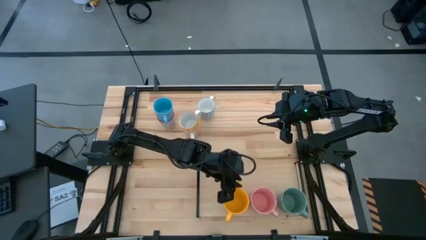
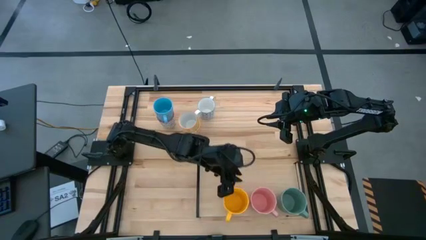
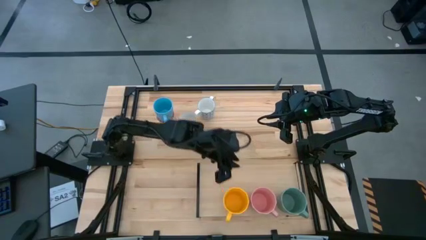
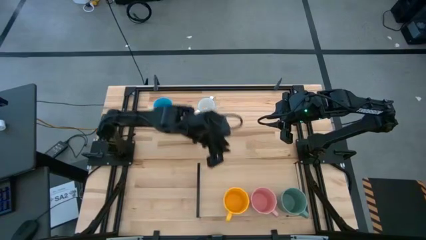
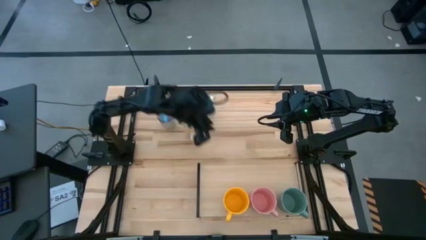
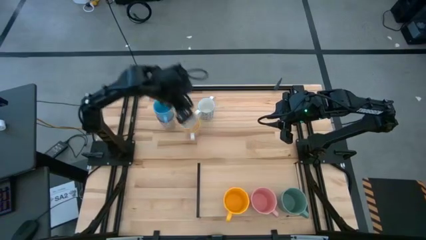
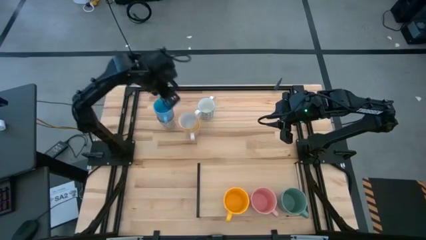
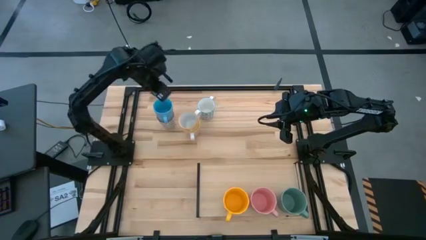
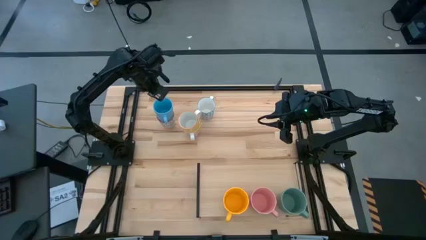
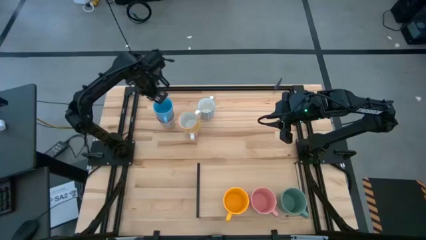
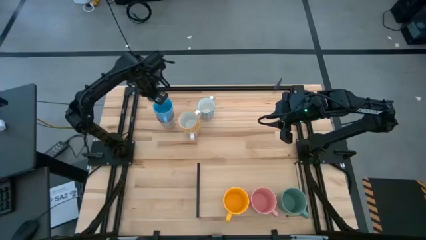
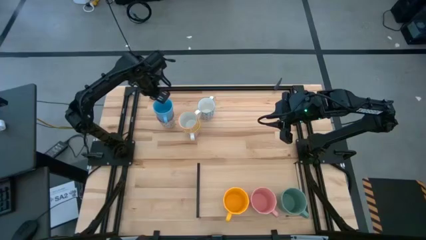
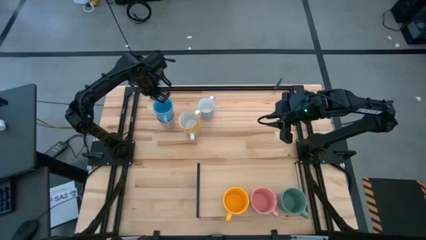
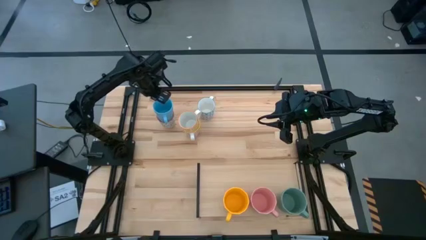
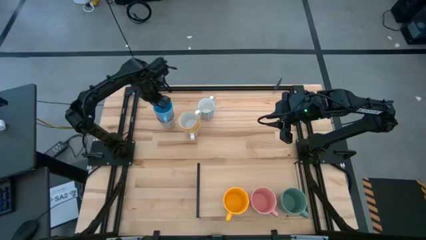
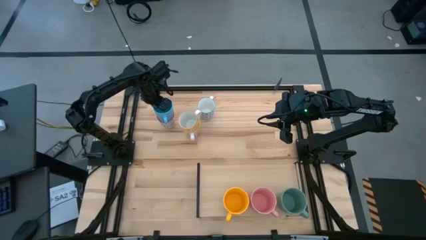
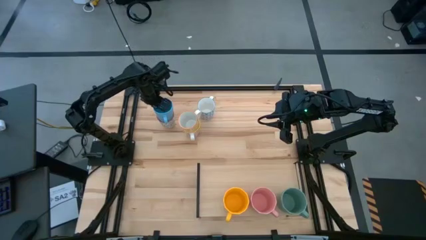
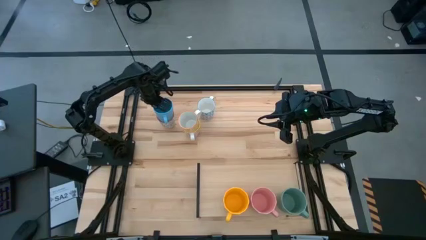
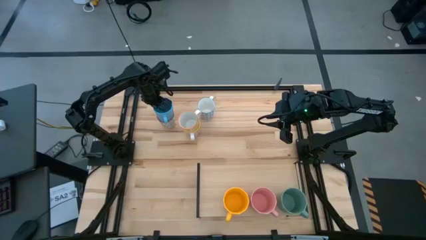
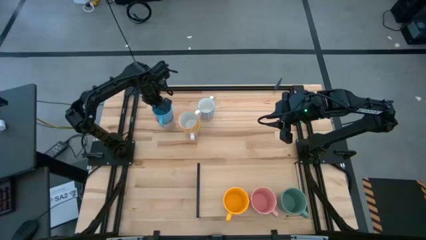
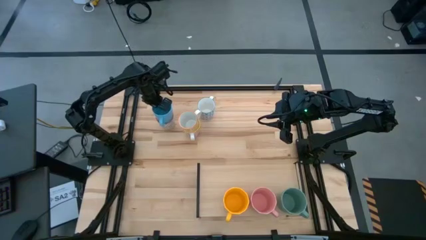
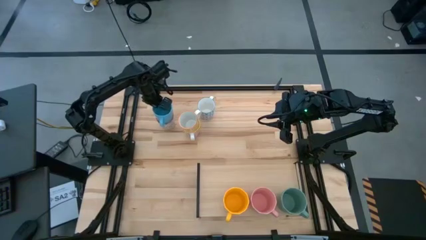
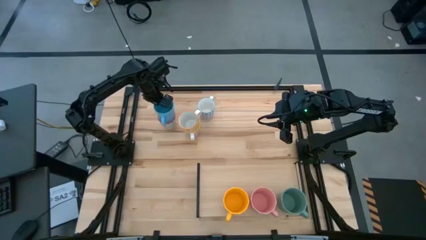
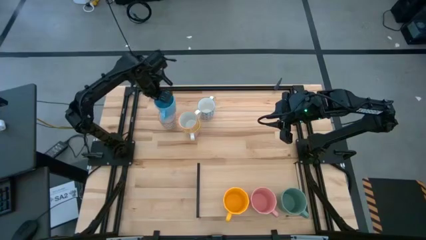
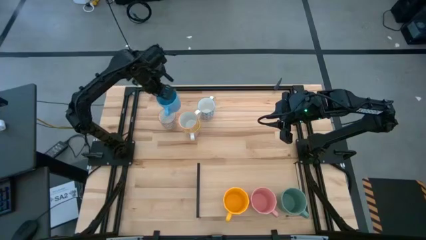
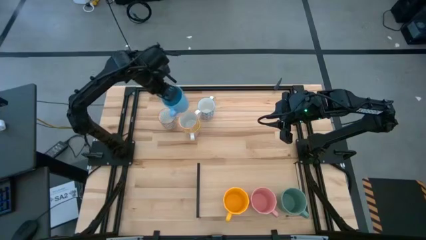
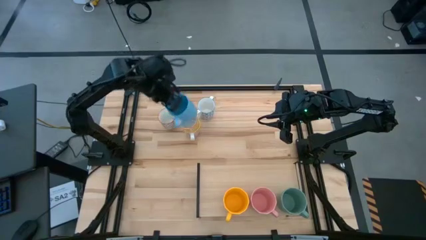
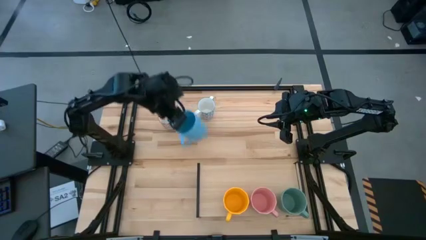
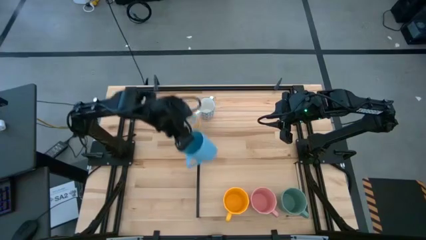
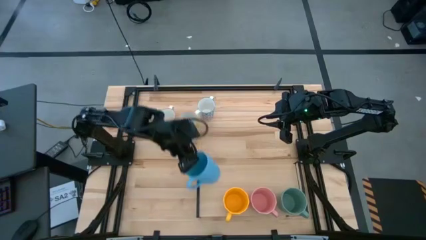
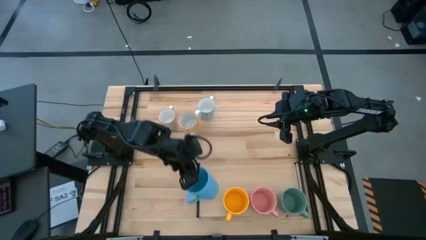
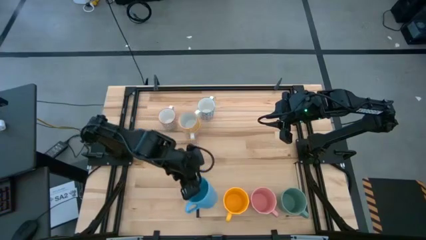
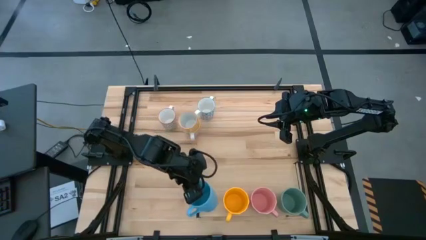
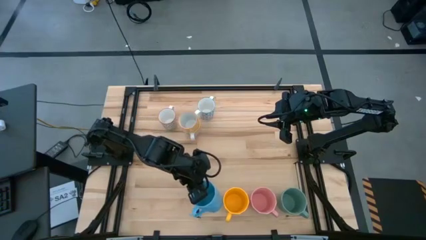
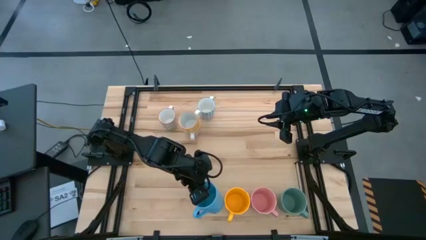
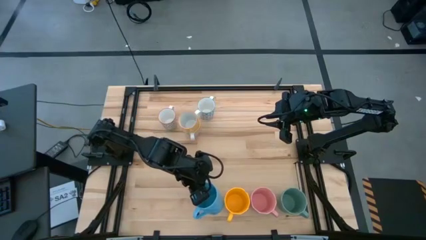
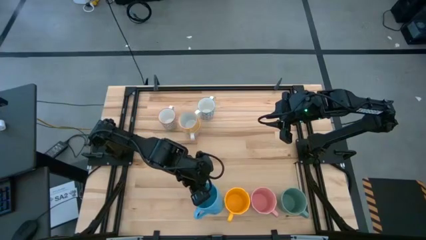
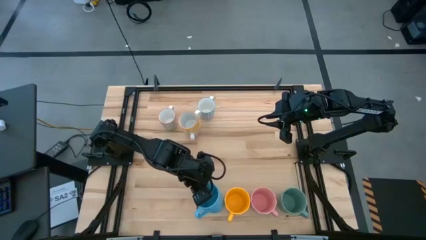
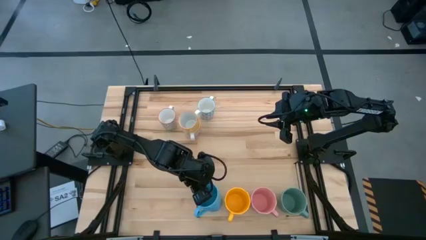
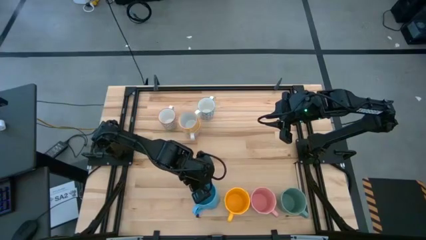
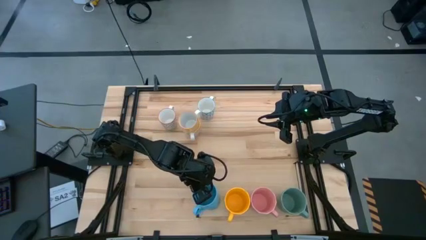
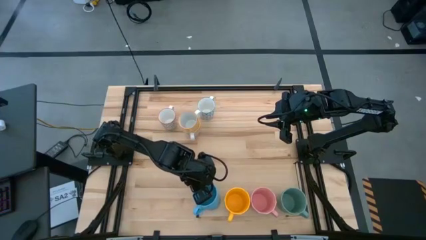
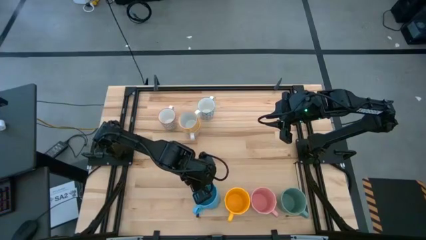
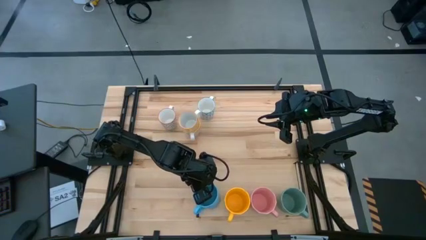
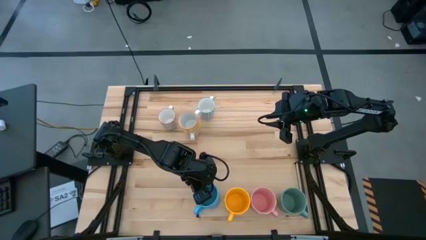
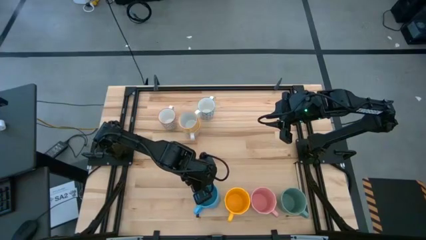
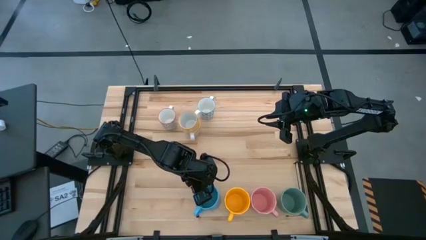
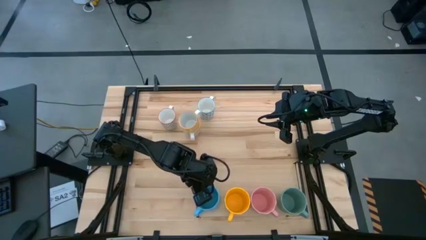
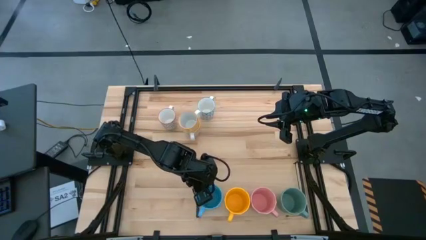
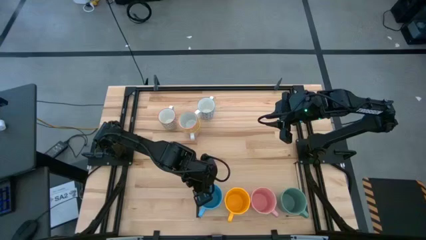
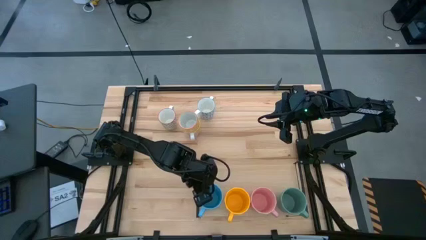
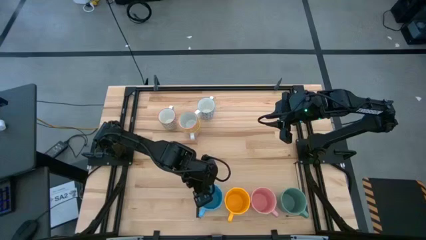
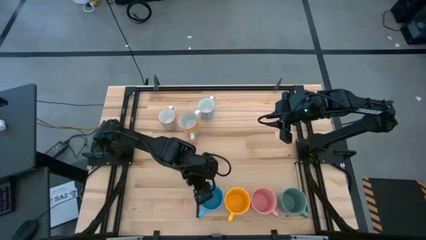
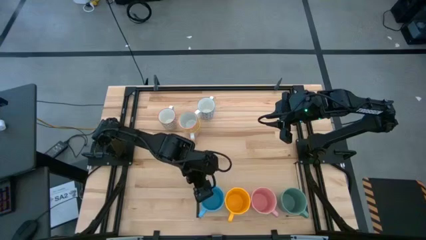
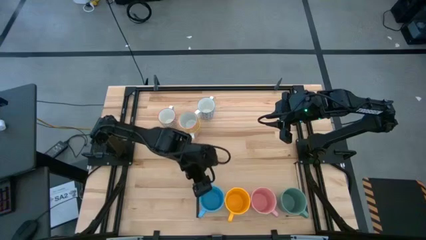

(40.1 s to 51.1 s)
Task: Place coffee mugs
Put the blue mug on the shelf

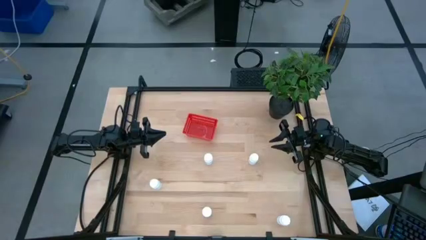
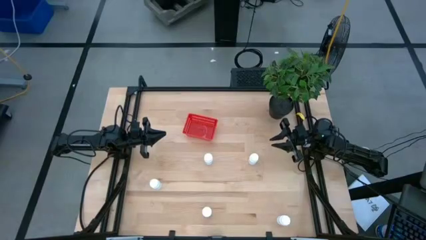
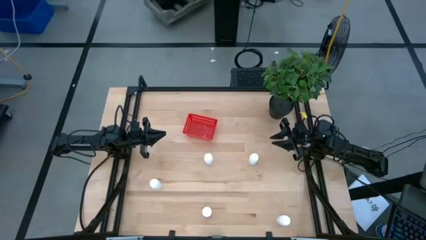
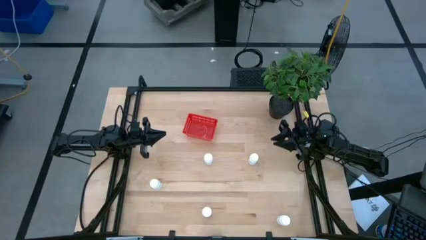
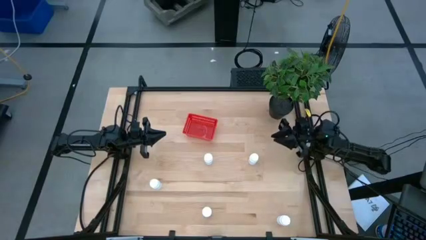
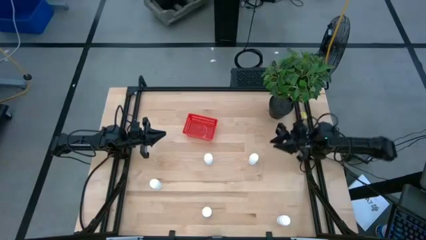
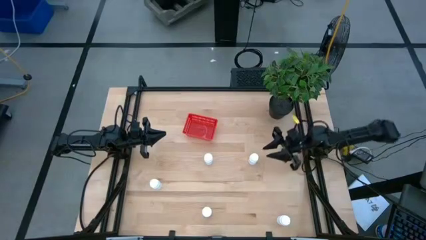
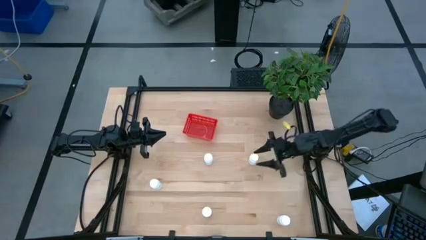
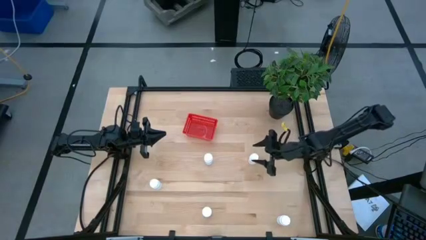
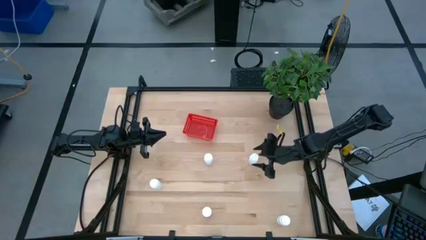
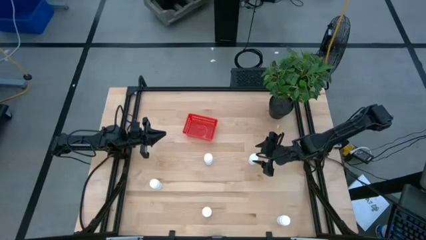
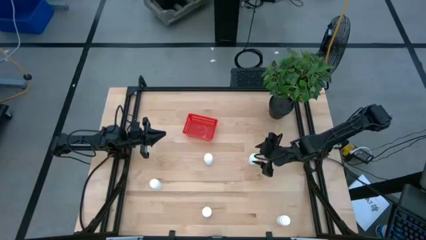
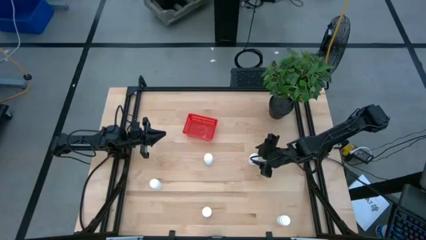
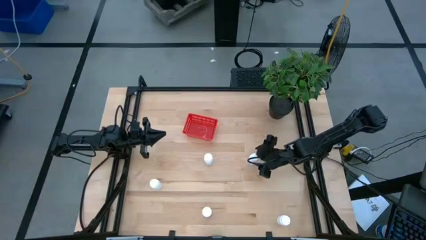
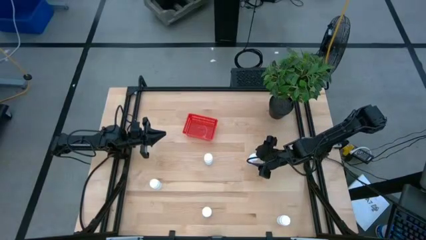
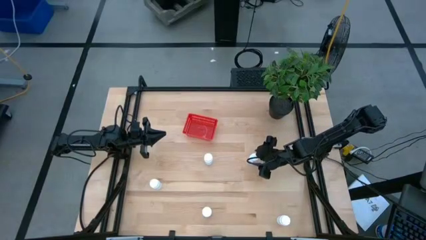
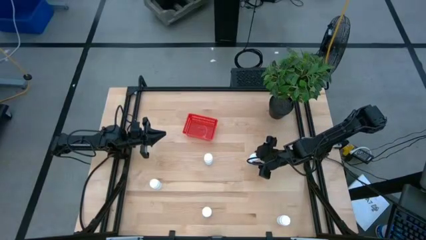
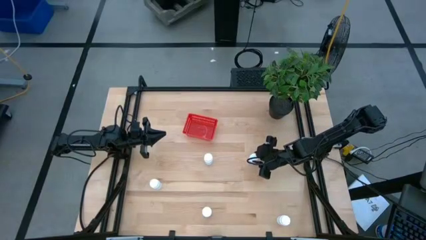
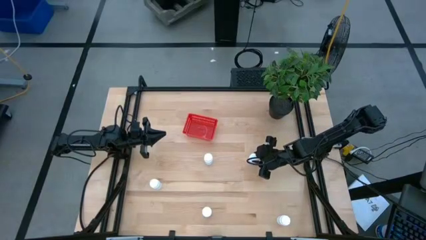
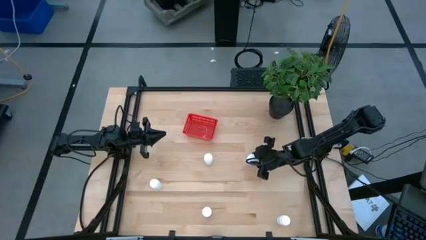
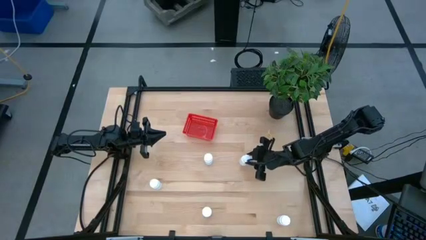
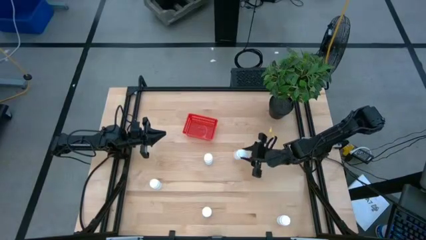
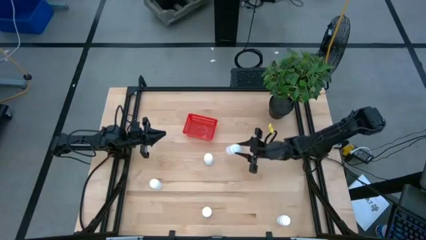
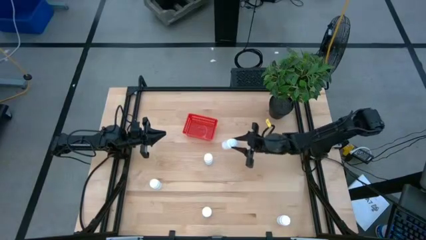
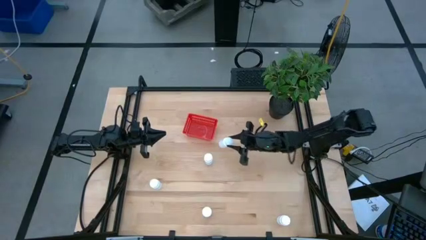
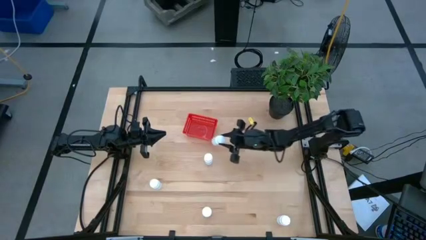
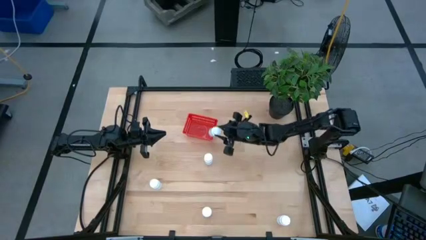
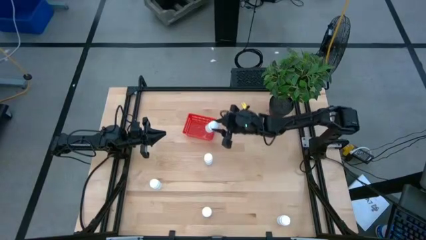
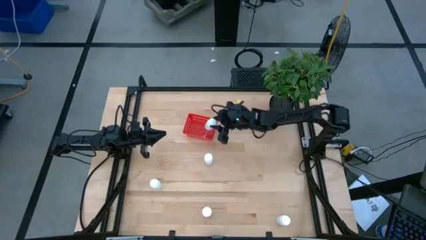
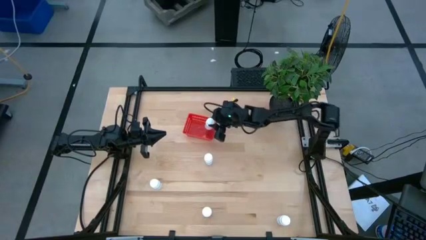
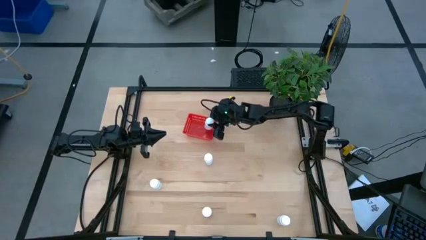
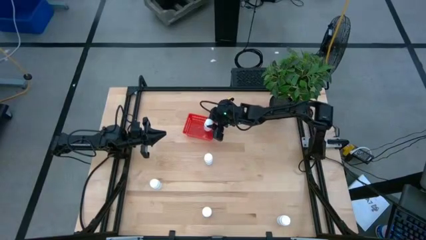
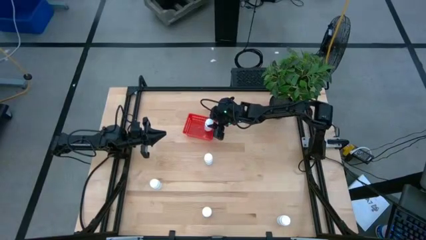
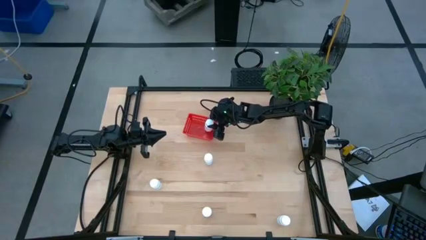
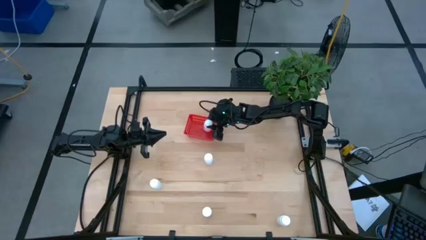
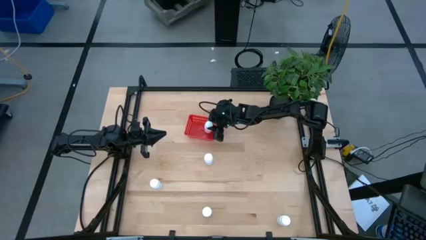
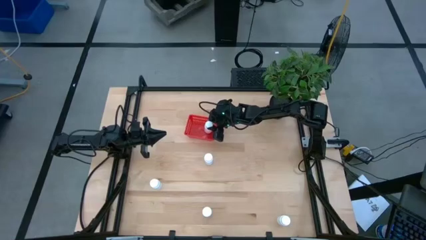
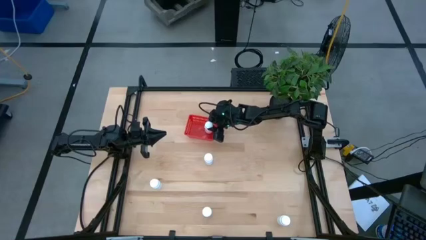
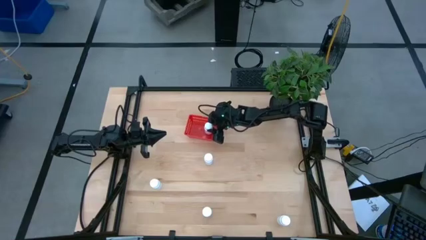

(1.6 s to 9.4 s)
Task: Pick and place pill bottles into a basket
Put the white pill bottle into the red basket
